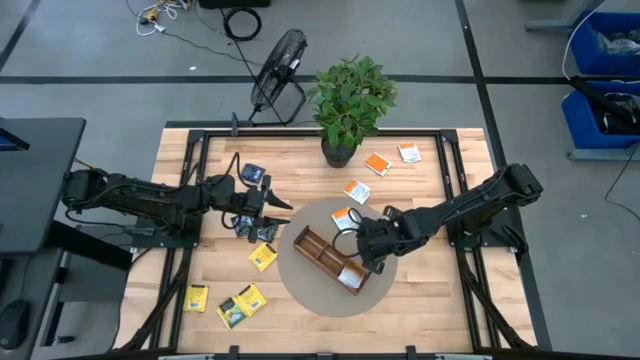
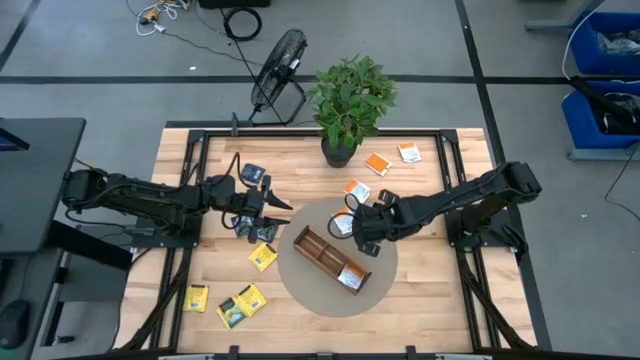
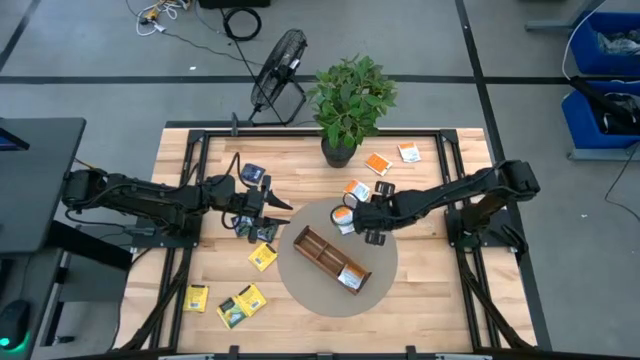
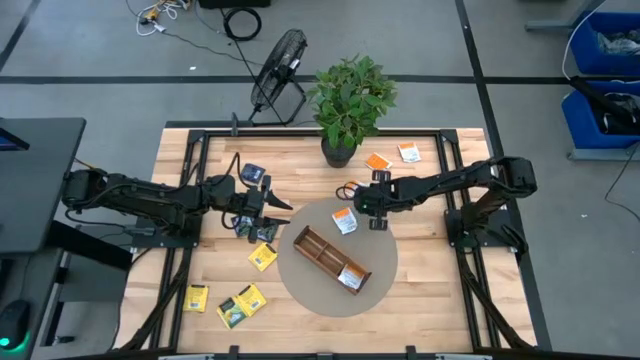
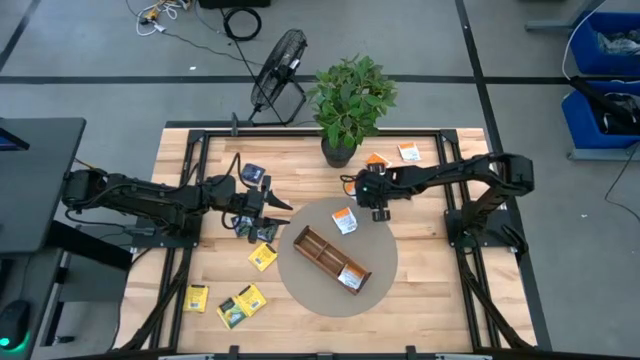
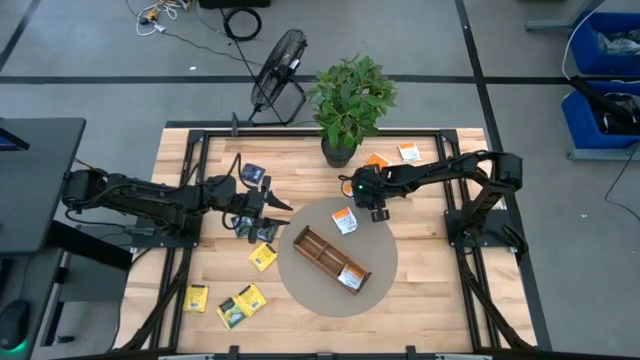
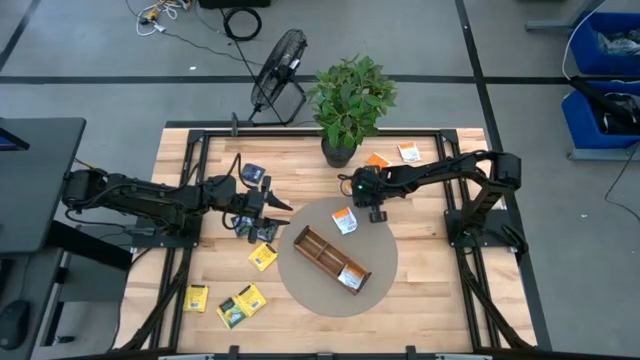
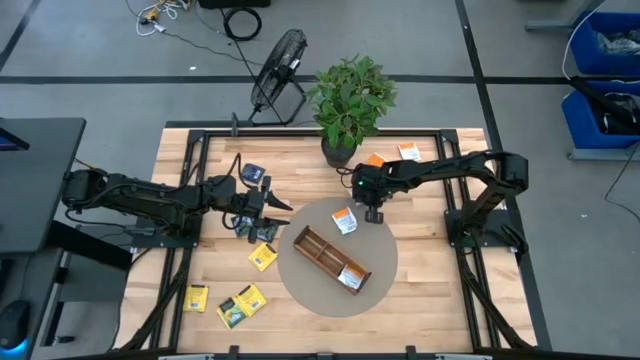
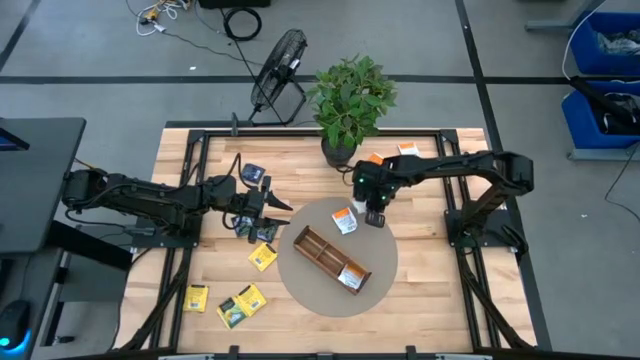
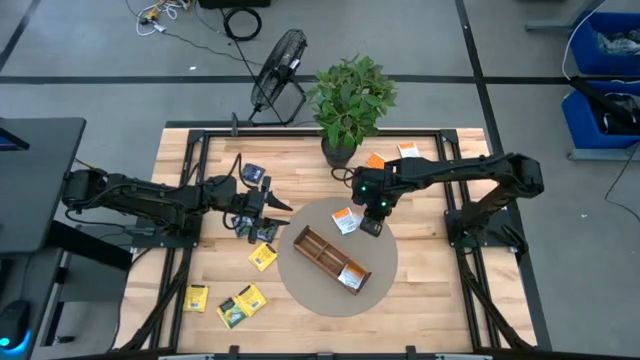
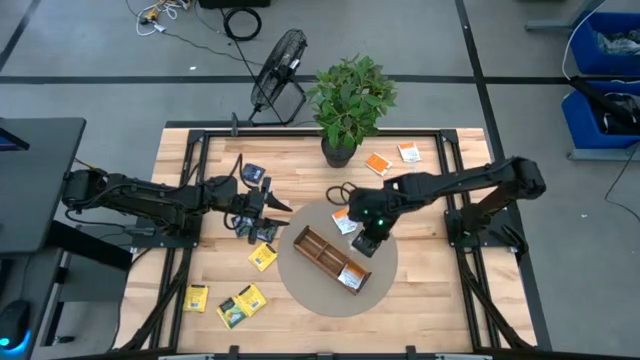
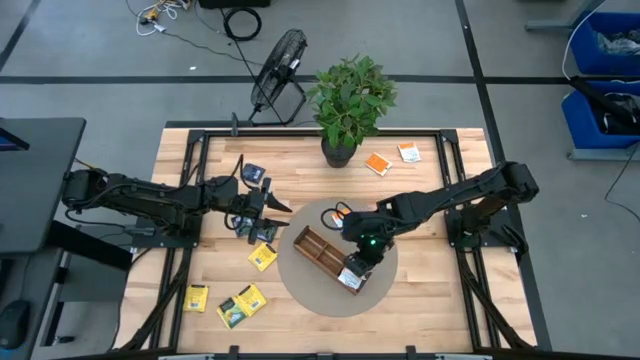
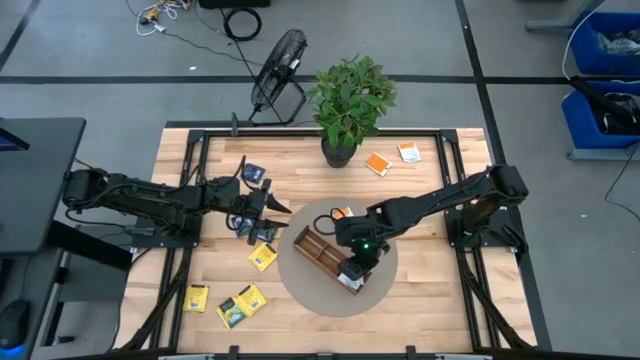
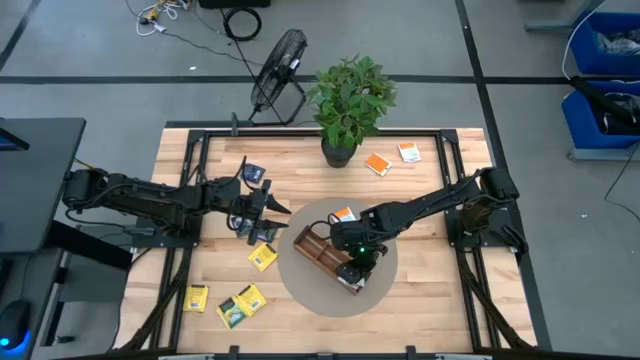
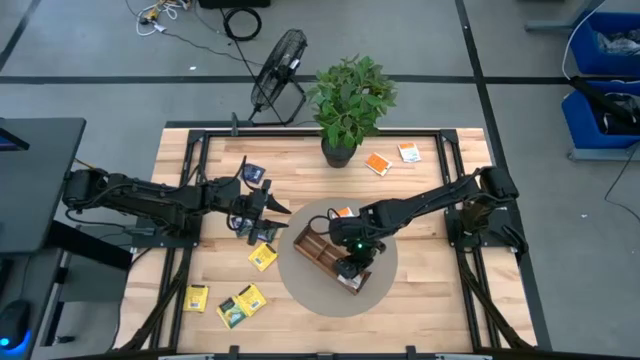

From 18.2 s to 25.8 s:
Task: Pick & Place Tea
Put the orange tea bag into the bottom section of the wooden organizer

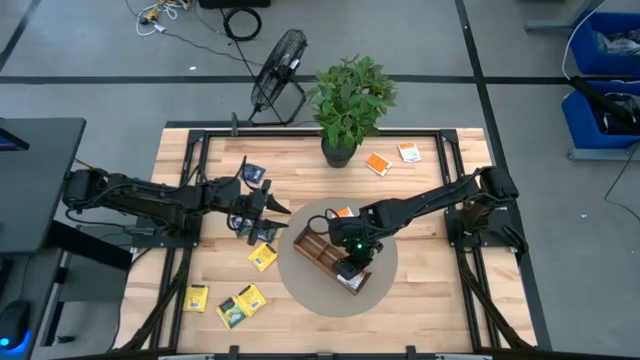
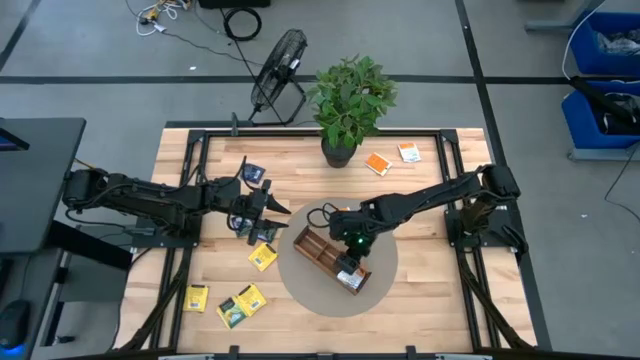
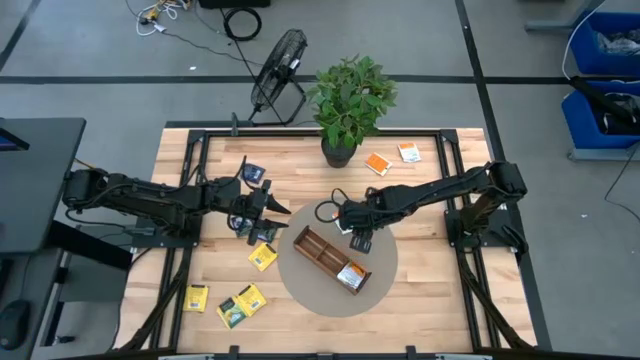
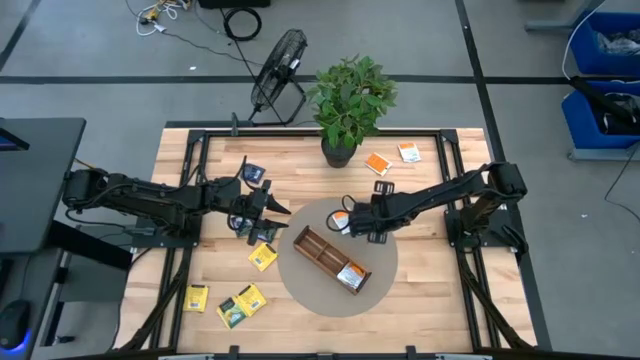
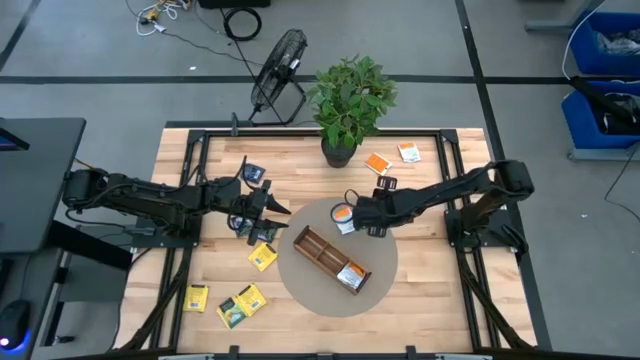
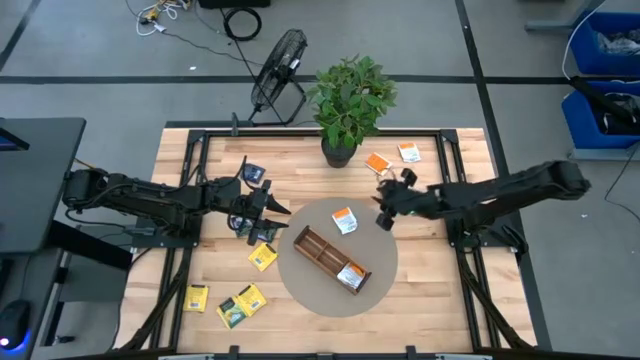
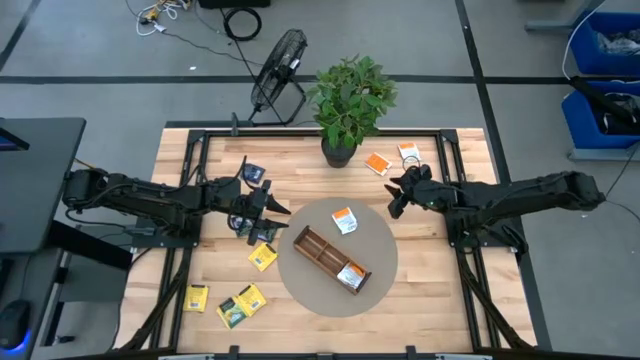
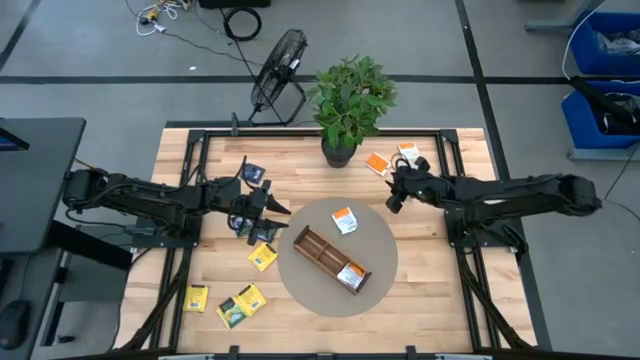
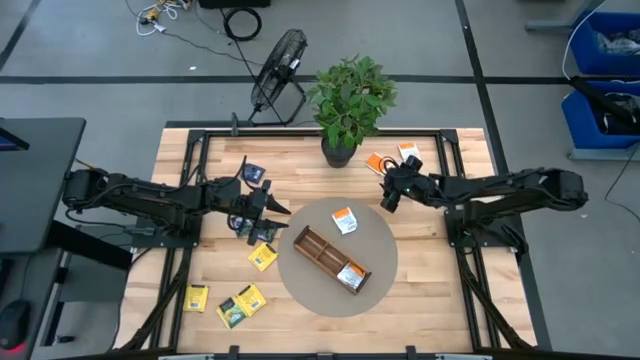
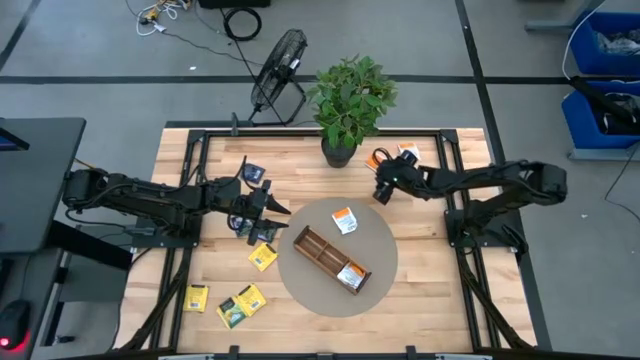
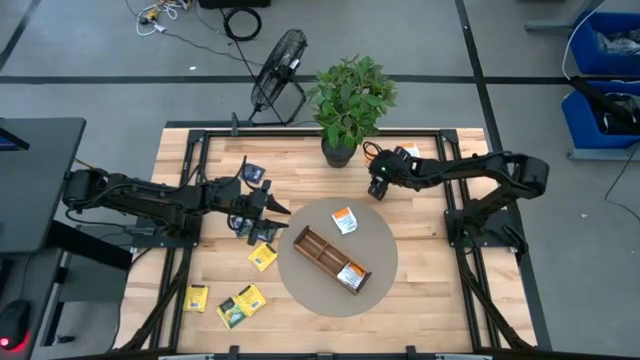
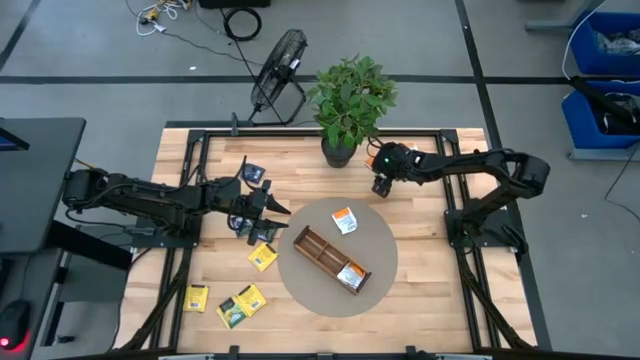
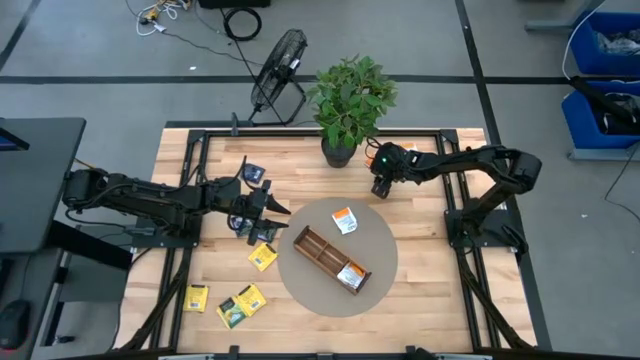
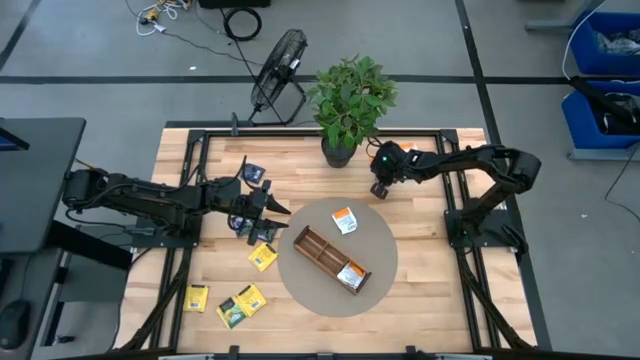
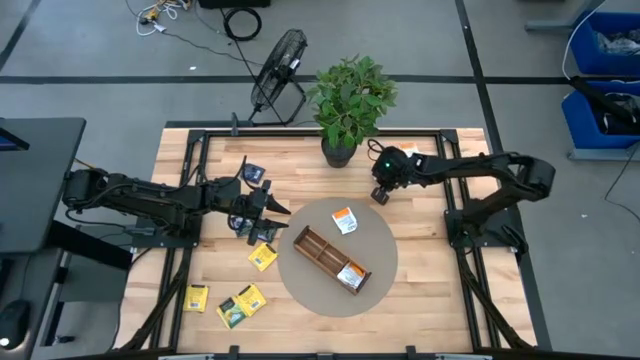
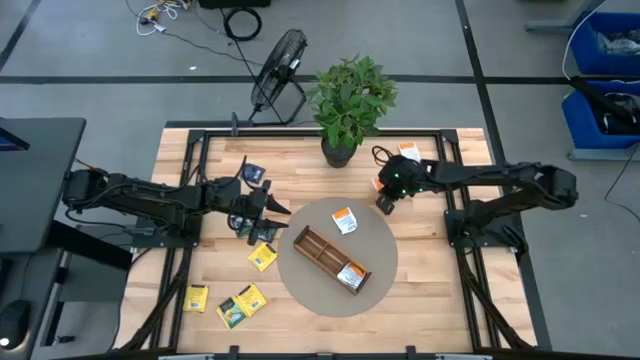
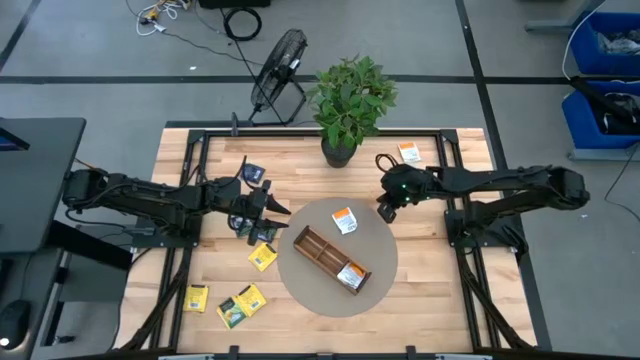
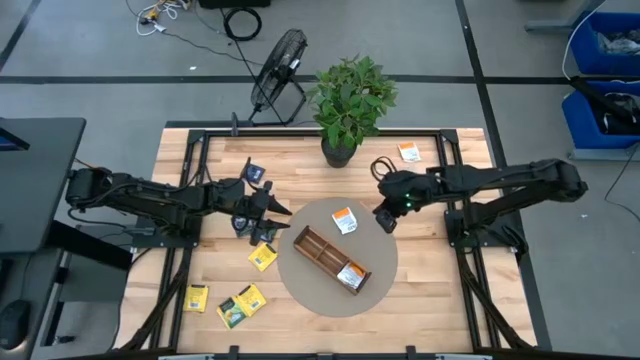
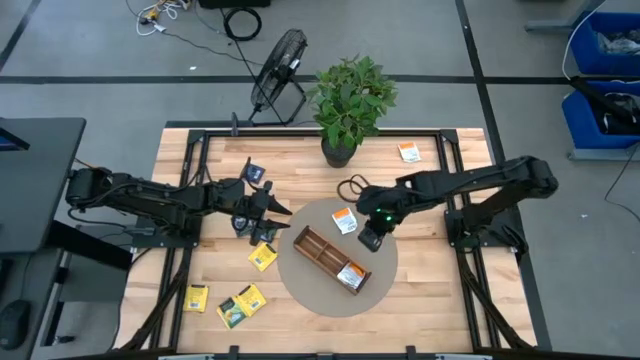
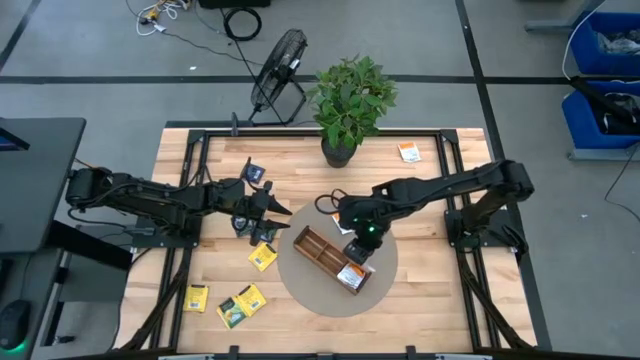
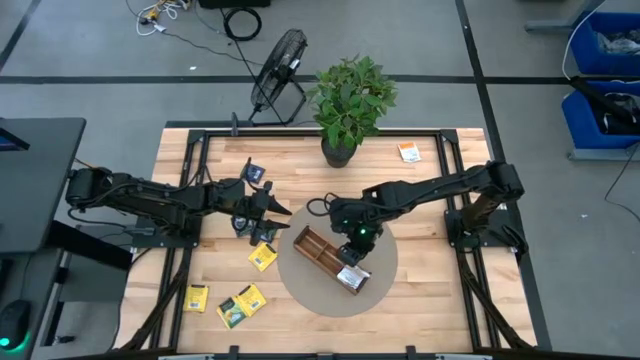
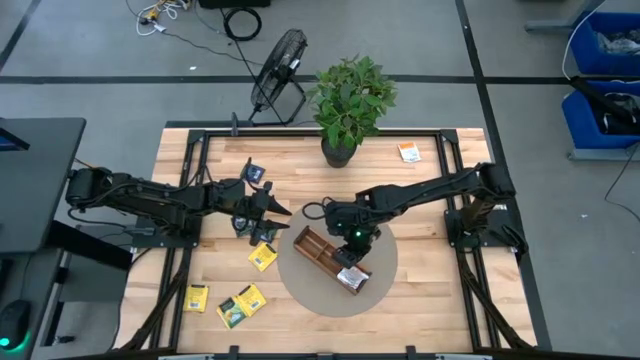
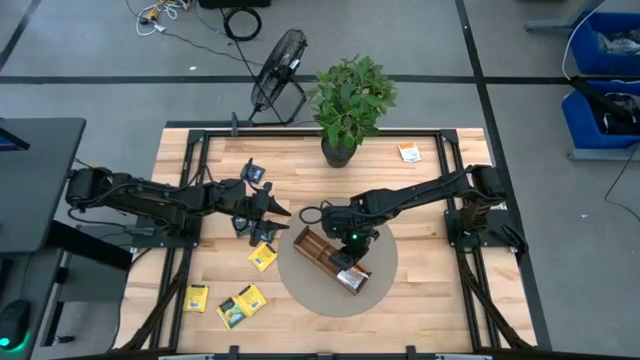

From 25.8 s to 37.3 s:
Put the orange tea bag into the bottom section of the wooden organizer

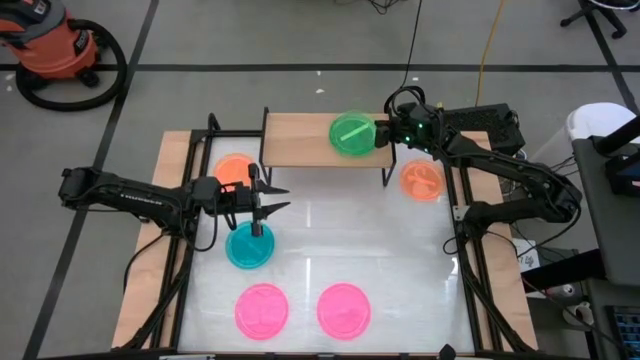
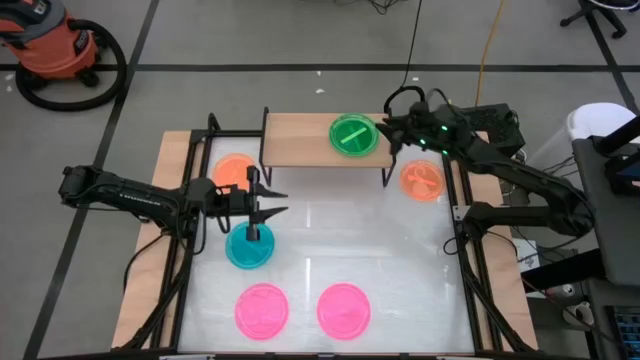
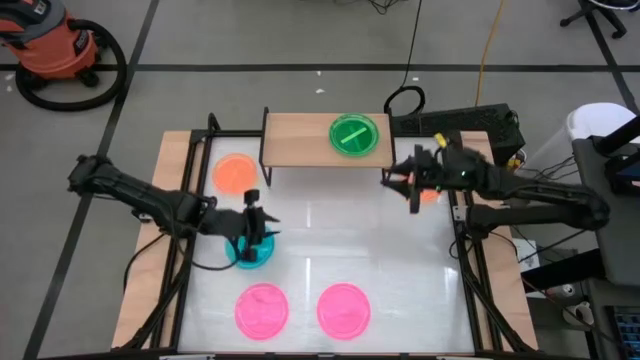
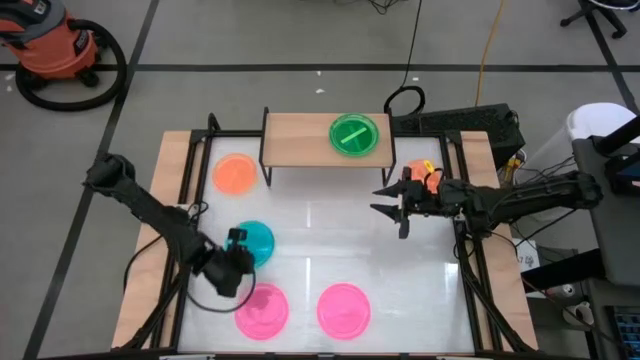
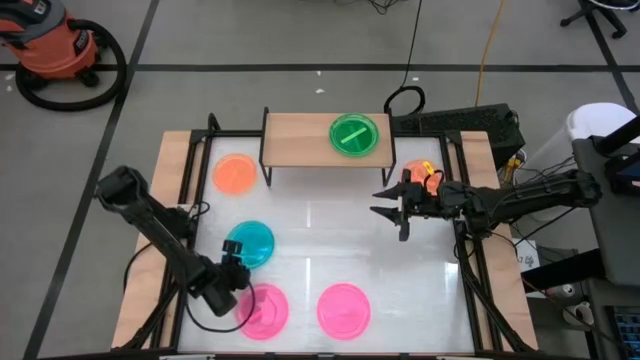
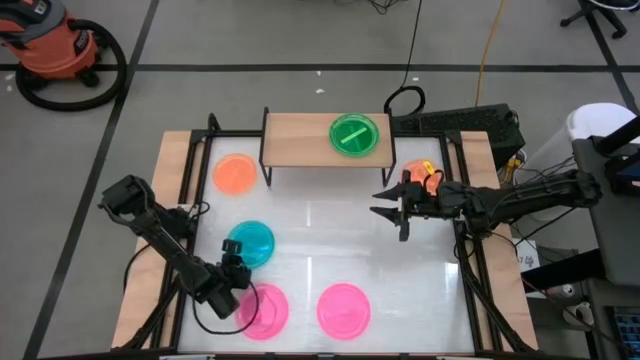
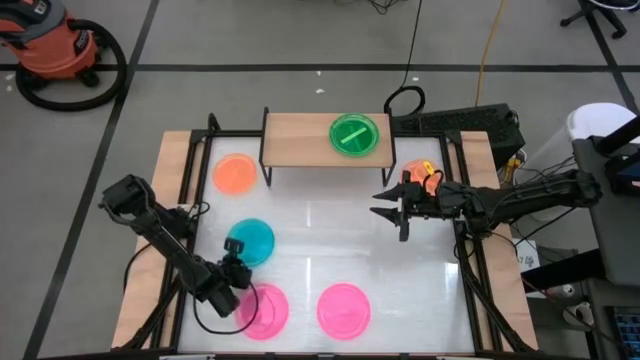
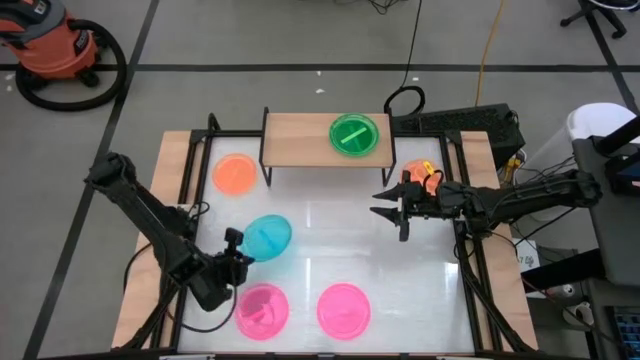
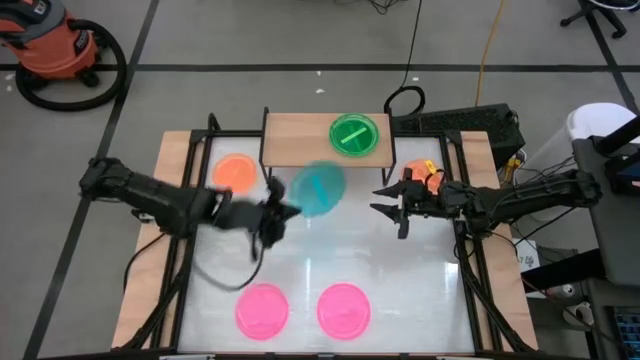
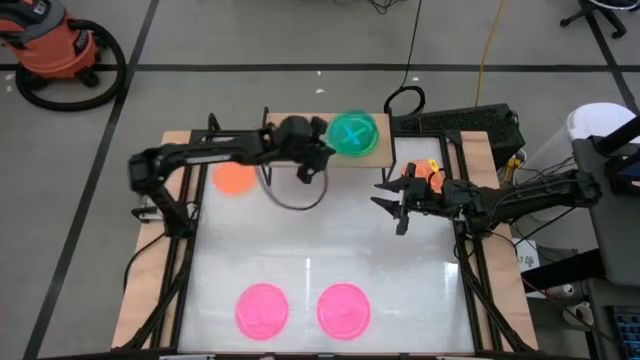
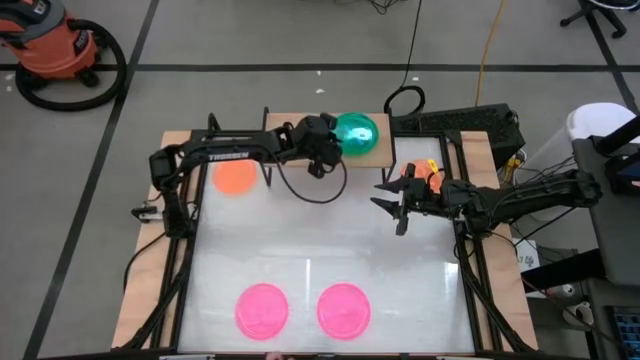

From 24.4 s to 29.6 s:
Task: Place and stack plates onto a shelf
Stack the blue transparent plate on the green transparent plate on the shelf
